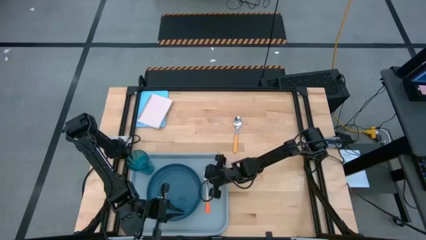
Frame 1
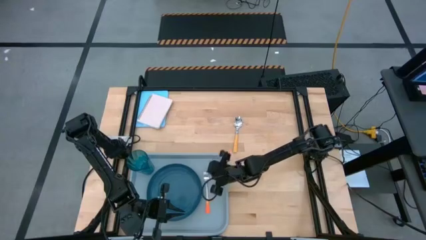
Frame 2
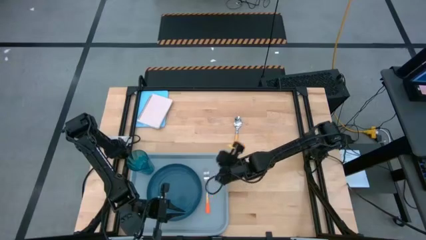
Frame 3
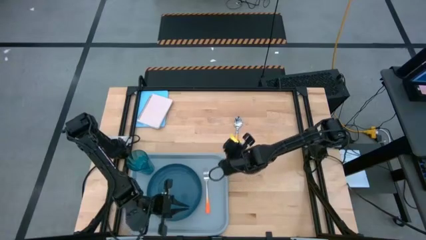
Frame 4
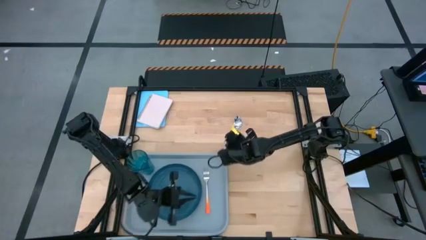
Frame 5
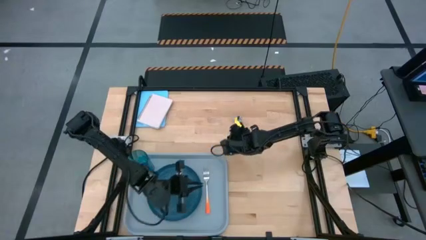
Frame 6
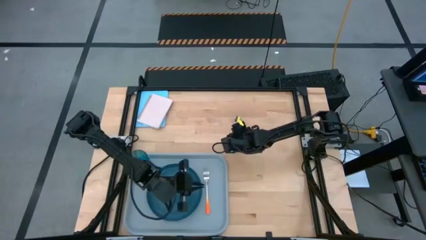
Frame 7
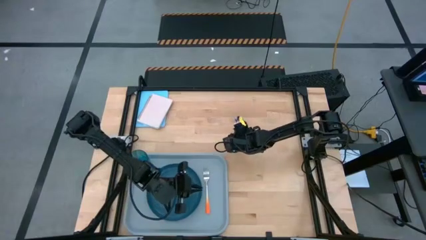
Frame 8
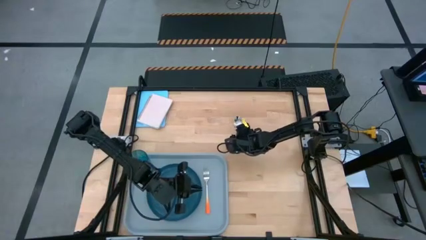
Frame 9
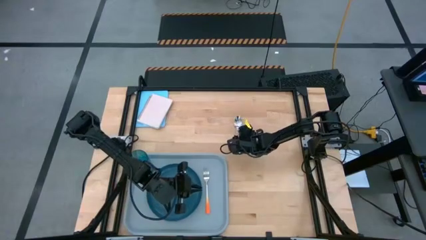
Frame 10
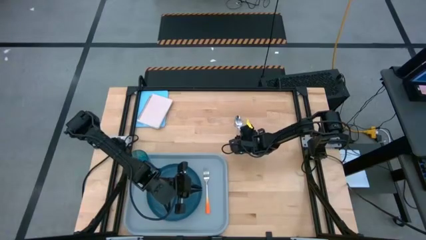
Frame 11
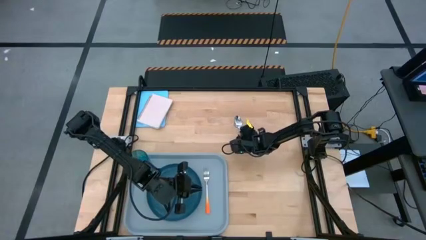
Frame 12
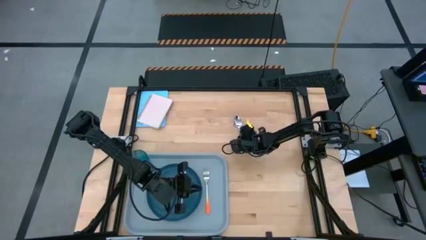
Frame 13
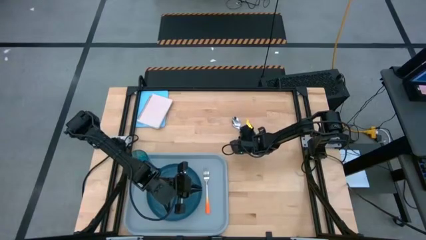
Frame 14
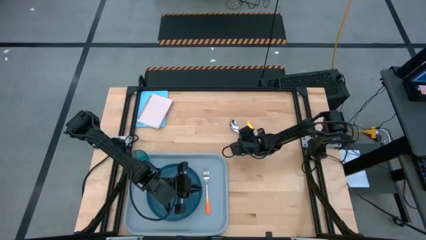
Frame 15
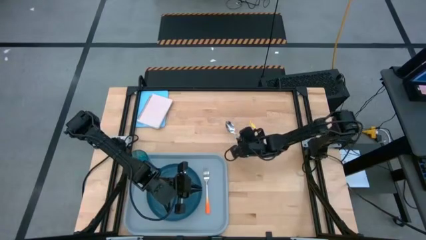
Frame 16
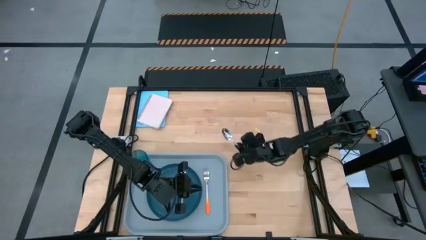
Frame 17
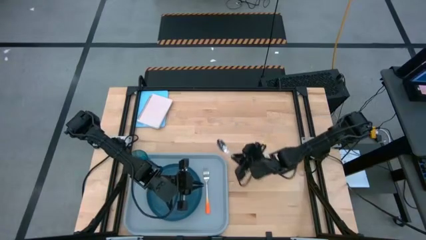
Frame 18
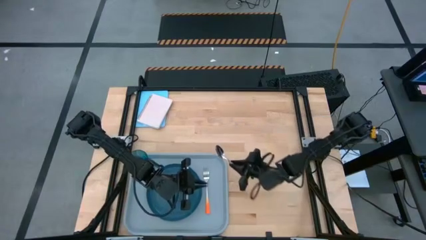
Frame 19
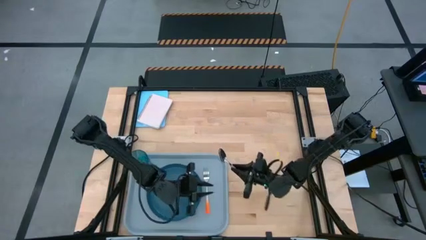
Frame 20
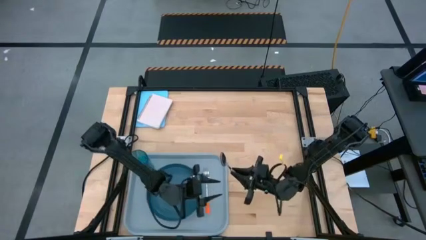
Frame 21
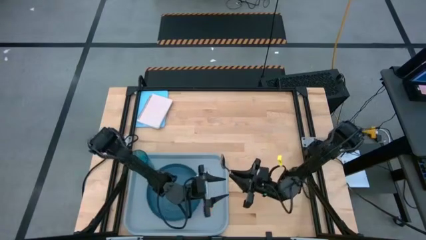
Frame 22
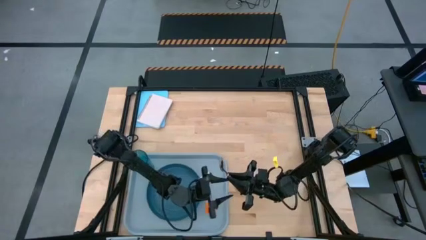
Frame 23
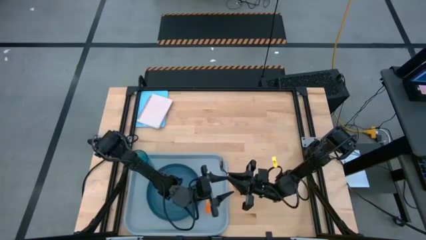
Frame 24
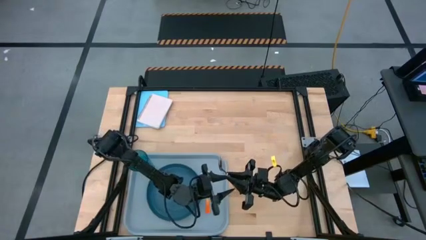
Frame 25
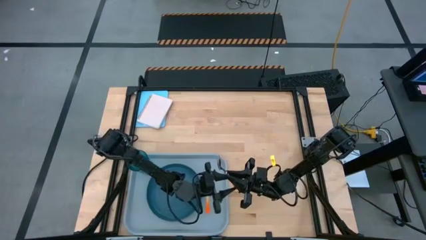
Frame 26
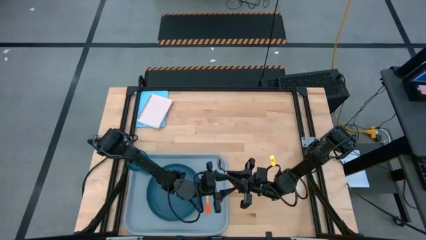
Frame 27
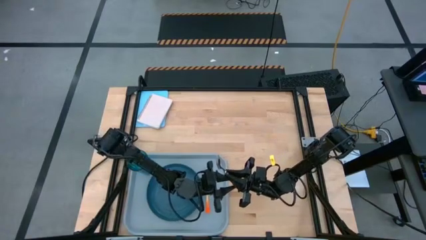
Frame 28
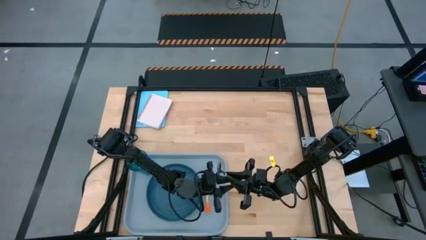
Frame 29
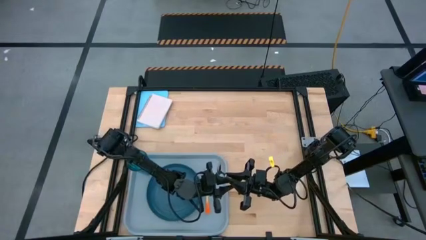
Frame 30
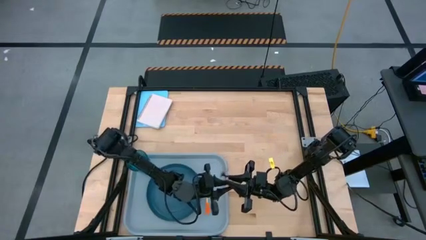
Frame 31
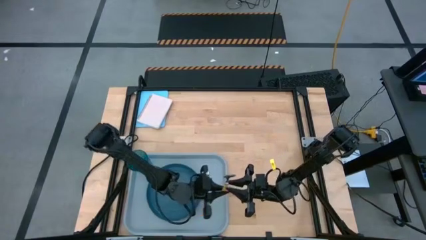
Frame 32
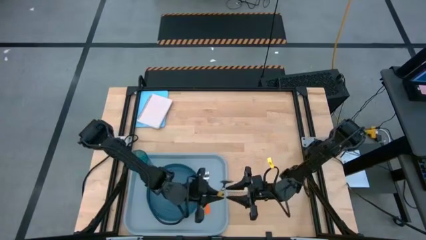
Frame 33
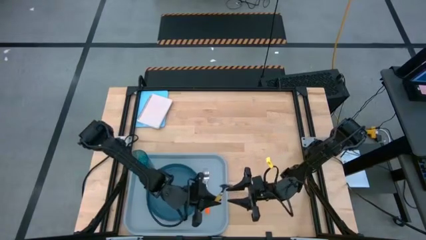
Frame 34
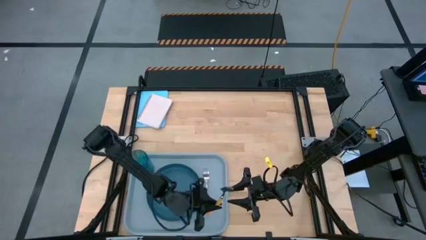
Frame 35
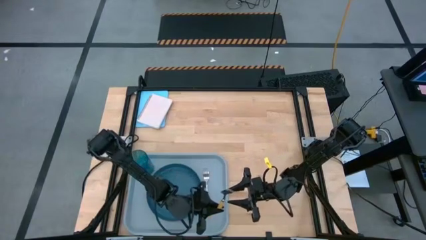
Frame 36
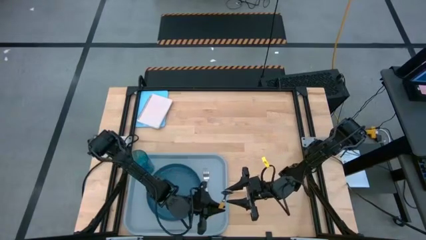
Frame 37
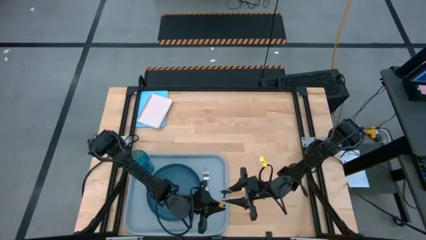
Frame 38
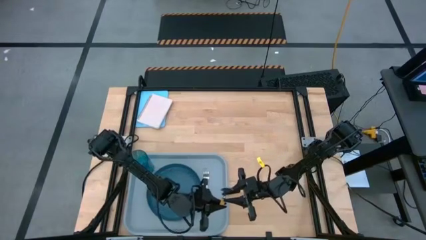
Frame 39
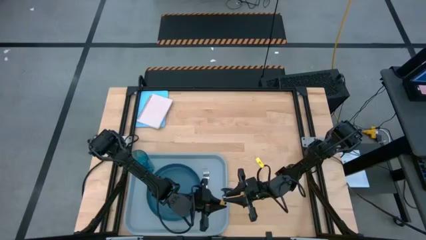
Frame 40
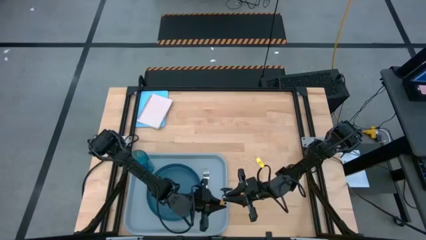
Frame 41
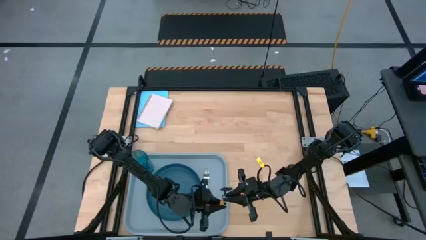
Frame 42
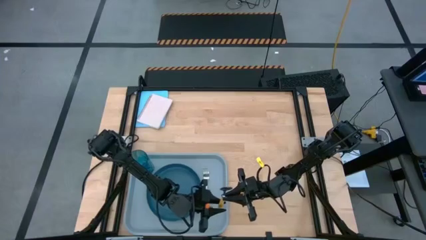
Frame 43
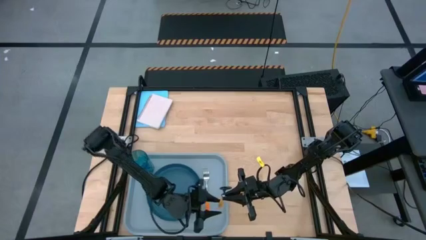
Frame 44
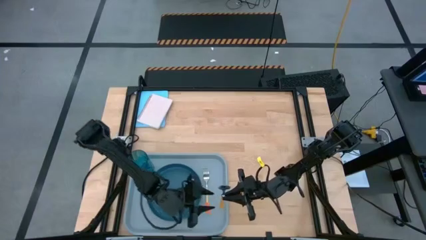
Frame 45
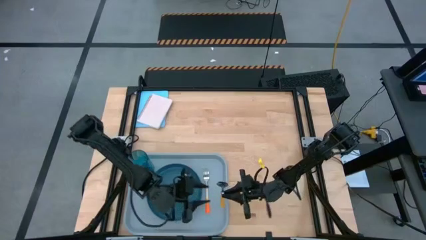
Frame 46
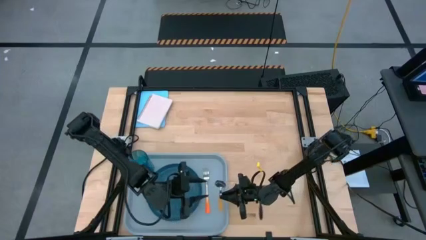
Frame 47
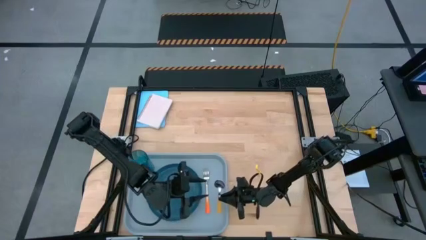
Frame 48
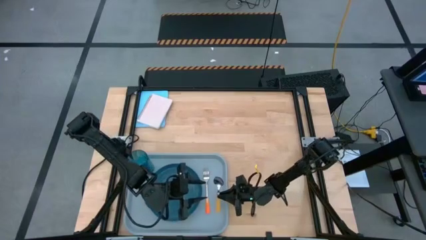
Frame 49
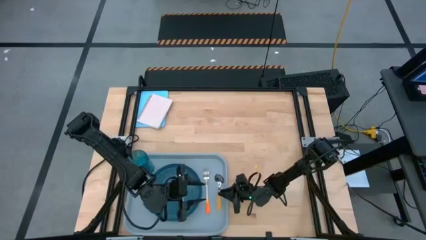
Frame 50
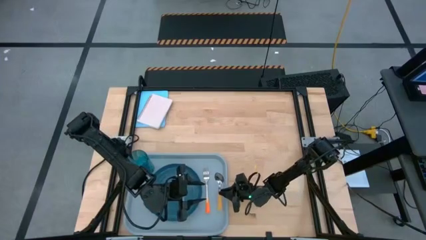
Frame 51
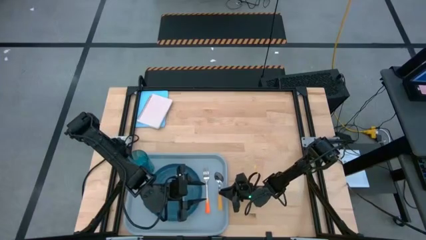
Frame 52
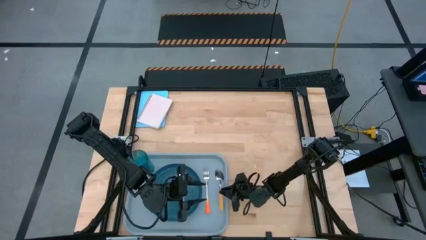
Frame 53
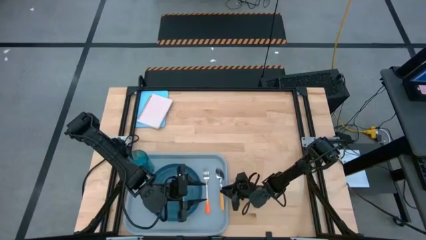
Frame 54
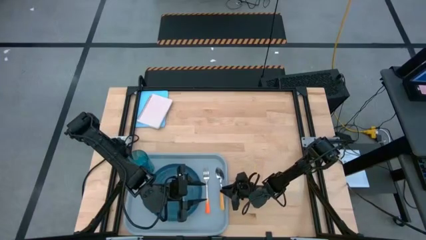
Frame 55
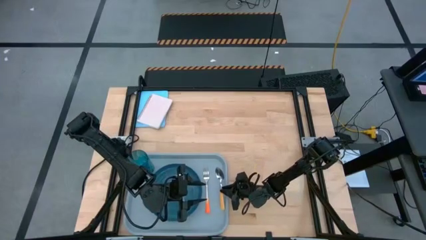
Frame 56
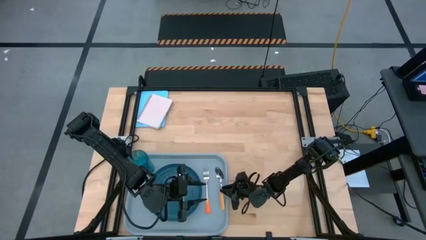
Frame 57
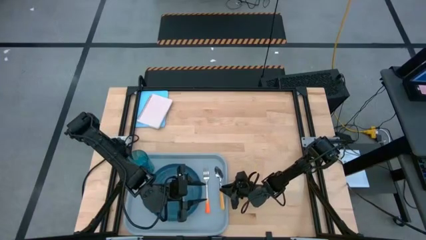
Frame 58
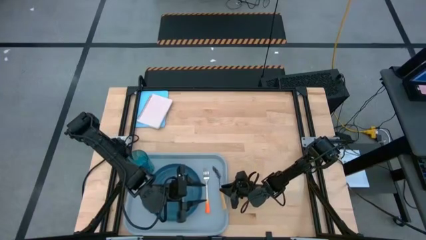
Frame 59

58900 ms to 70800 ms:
Task: Pick and place plate/cup/fork/spoon on tray
Put the yellow spoon on the gray tray to the right of the orange fork

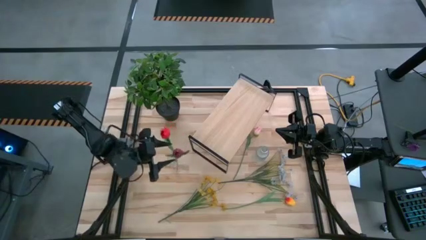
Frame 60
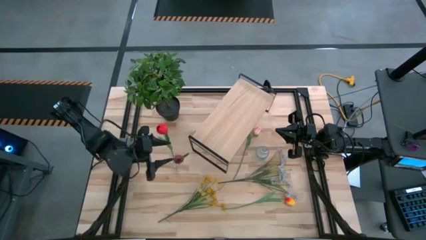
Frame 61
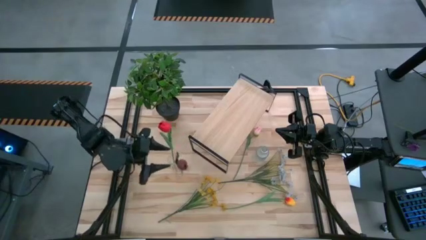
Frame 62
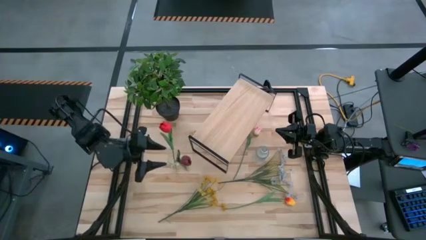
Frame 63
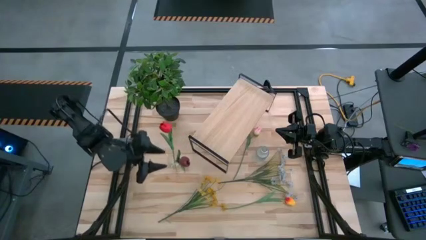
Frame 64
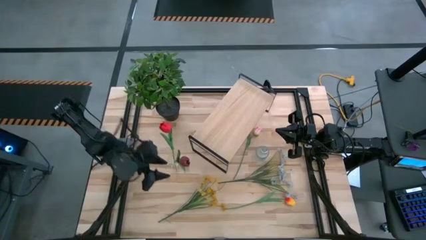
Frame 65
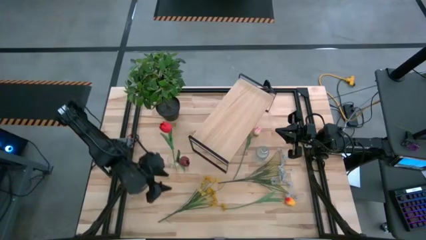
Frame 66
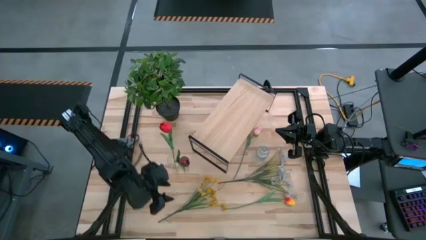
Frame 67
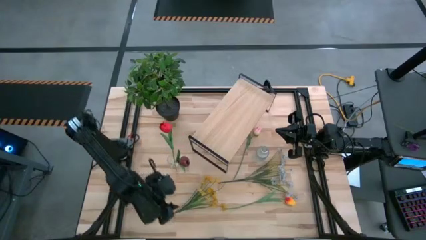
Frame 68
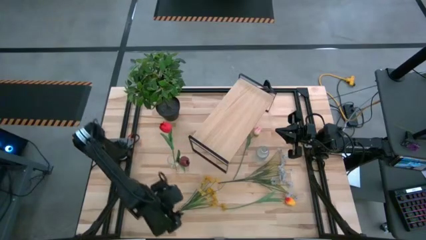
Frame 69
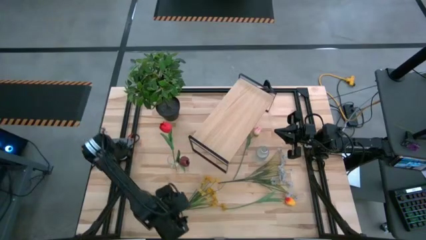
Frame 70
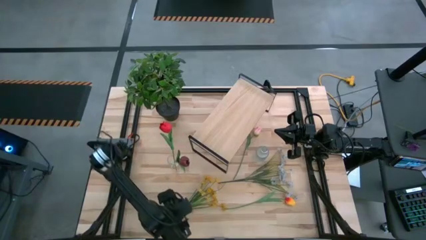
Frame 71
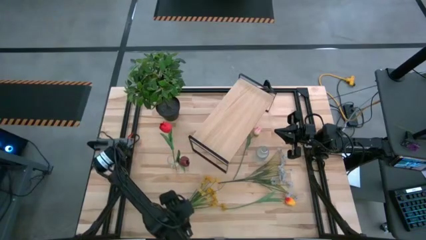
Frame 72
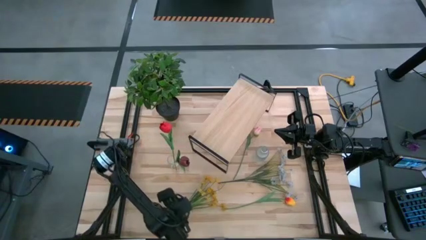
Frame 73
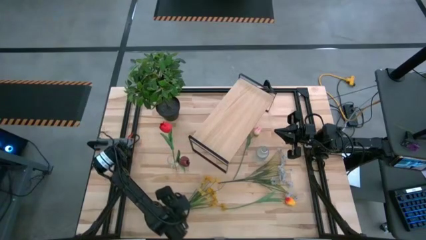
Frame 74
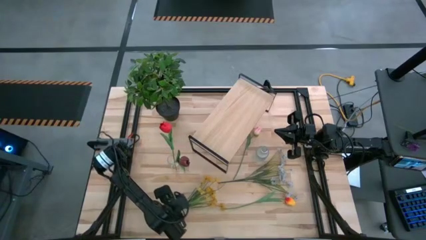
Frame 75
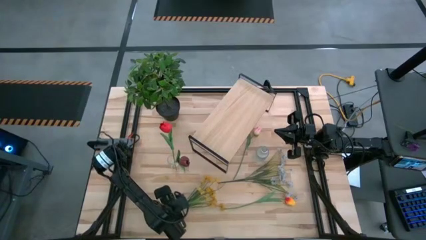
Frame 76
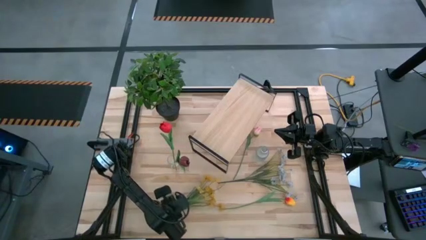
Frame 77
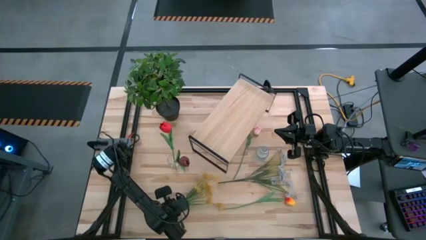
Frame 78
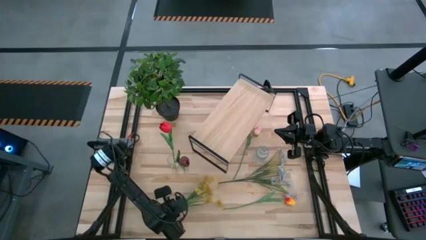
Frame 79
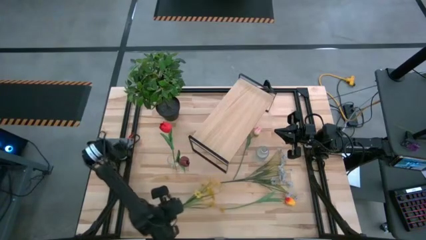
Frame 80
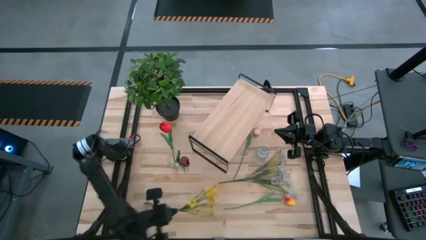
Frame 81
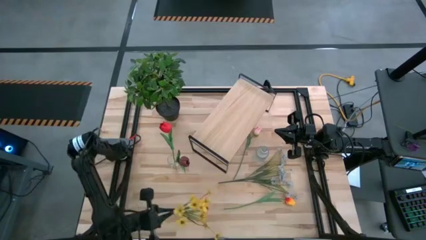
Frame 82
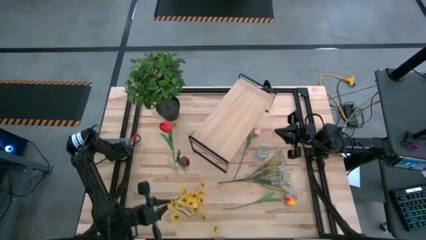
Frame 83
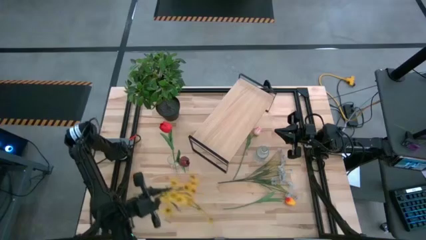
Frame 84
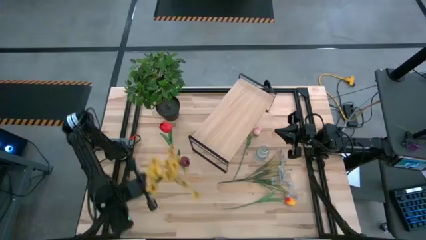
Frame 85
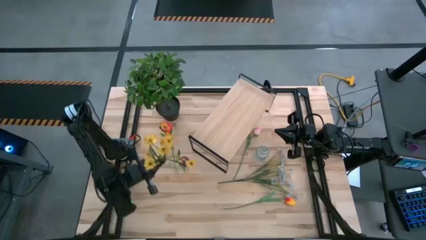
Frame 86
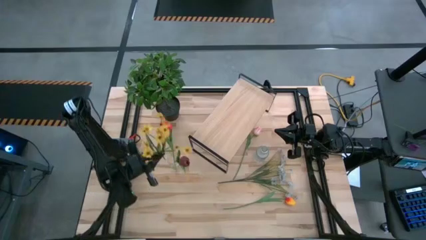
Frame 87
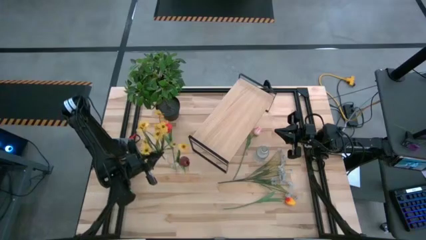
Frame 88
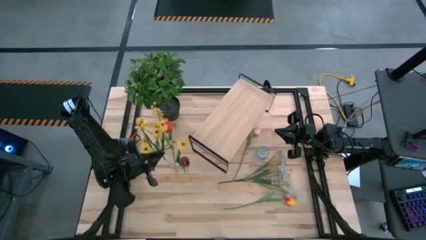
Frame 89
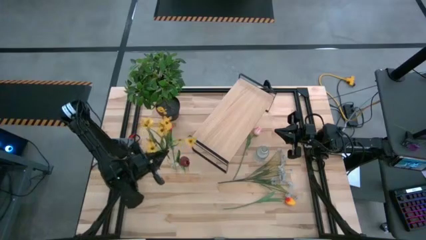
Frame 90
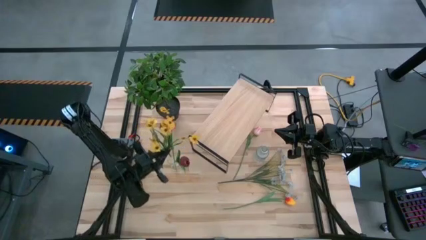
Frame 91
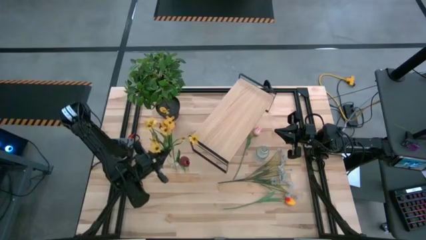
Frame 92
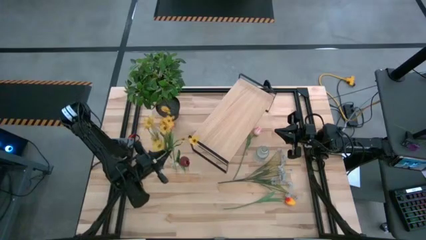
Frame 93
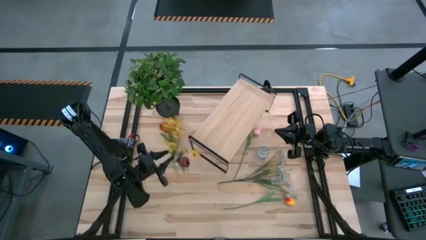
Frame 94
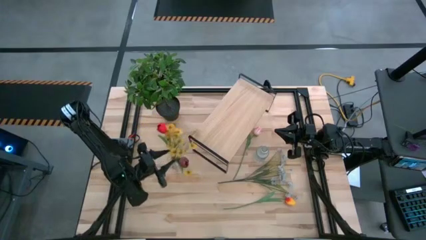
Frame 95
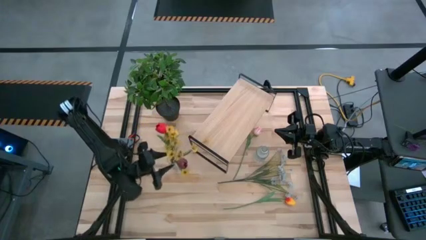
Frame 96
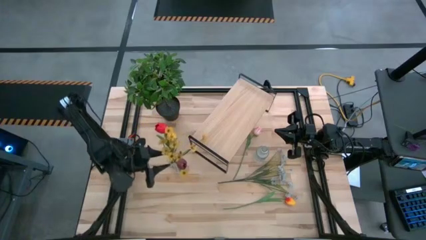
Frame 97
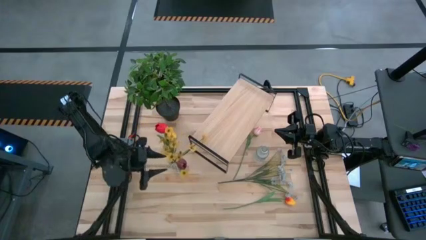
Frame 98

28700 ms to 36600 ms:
Task: Pick and place flowers into a vace then onto a shelf
Put the yellow flowers into the left transparent vase
